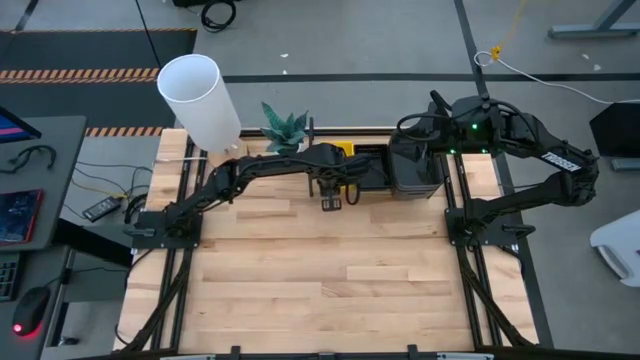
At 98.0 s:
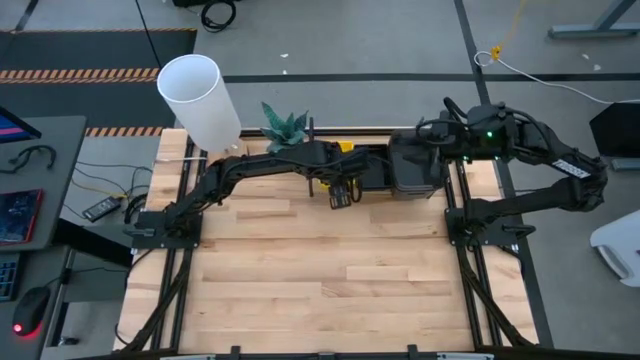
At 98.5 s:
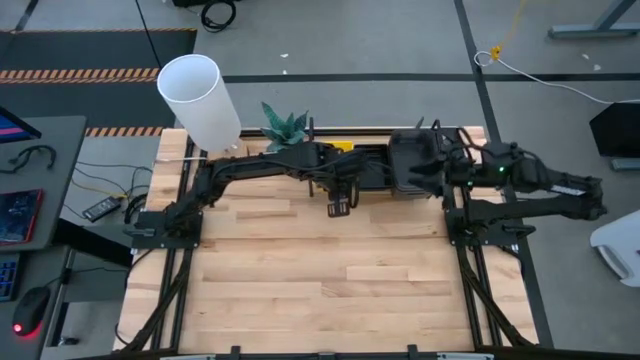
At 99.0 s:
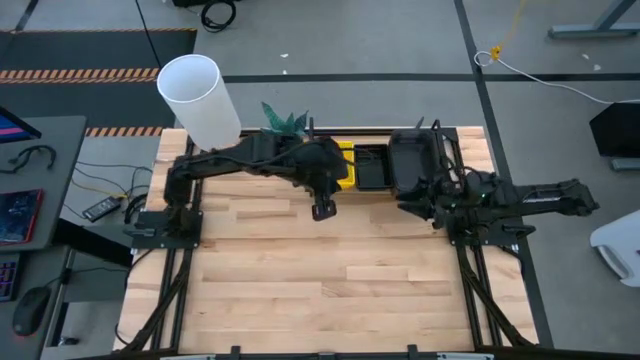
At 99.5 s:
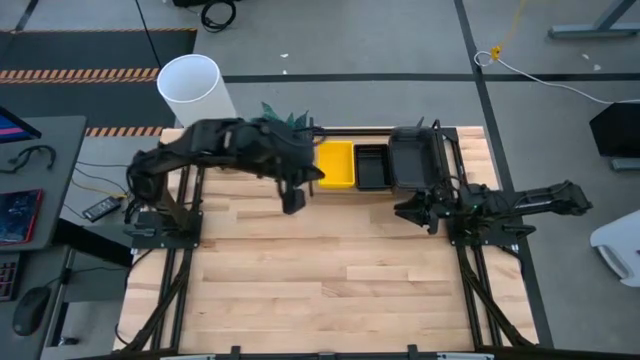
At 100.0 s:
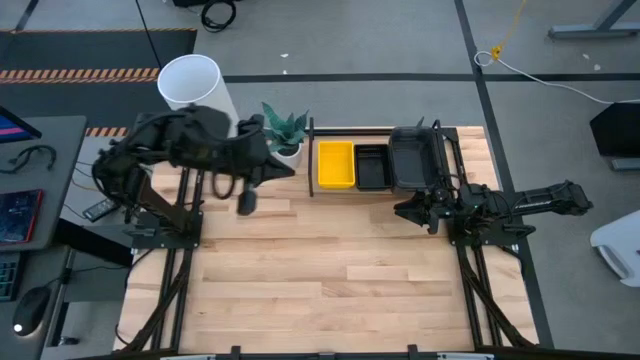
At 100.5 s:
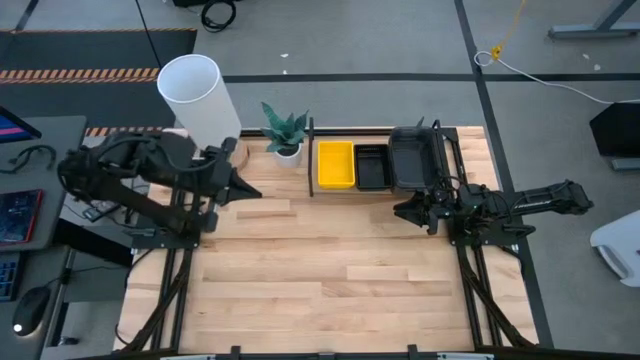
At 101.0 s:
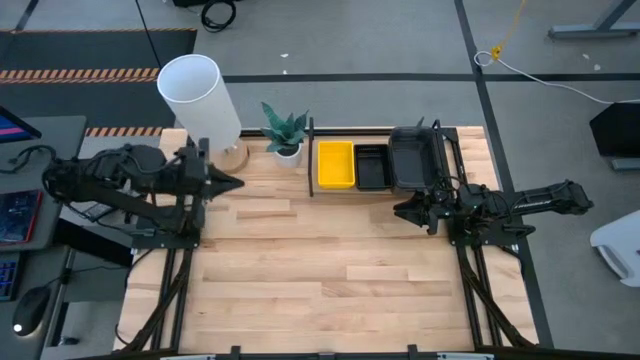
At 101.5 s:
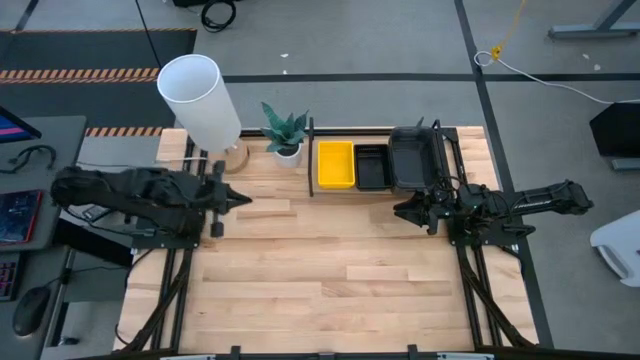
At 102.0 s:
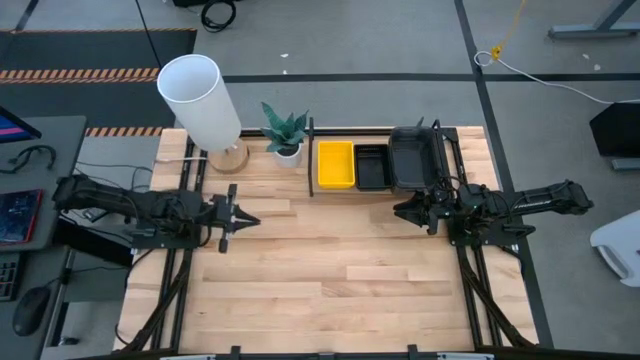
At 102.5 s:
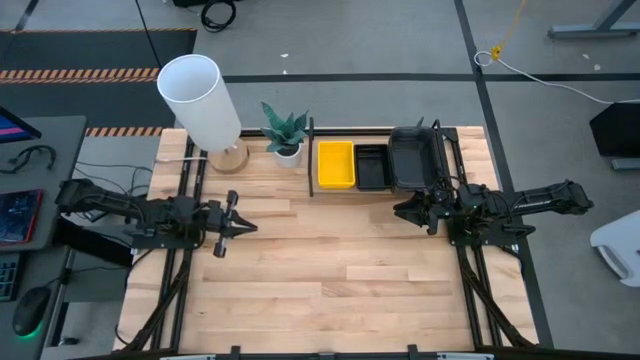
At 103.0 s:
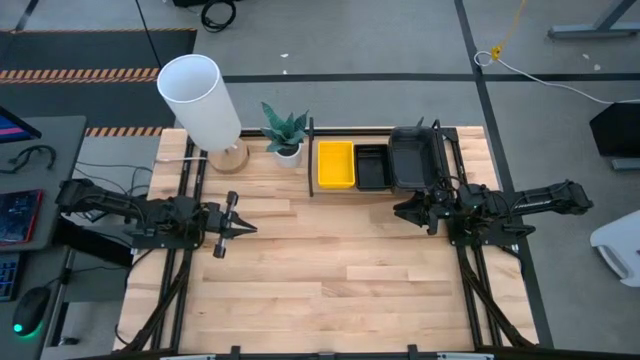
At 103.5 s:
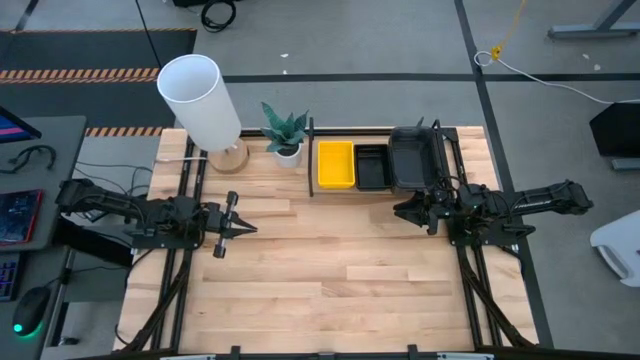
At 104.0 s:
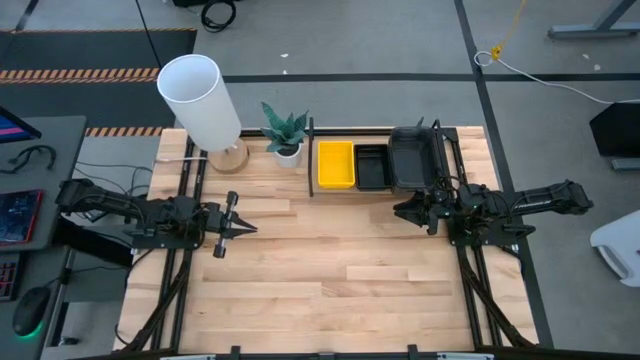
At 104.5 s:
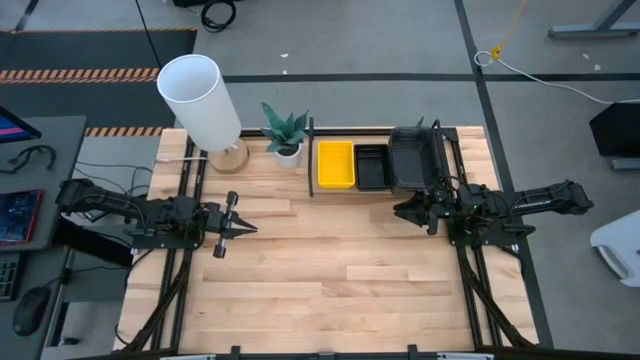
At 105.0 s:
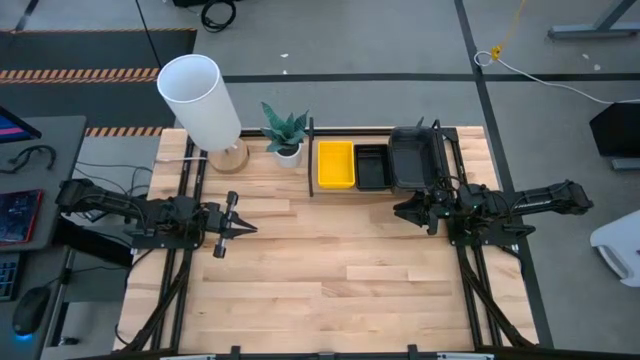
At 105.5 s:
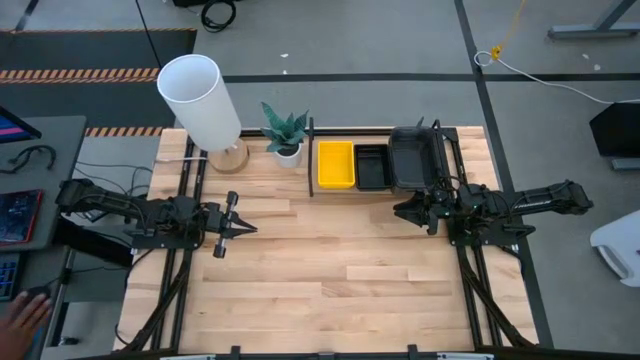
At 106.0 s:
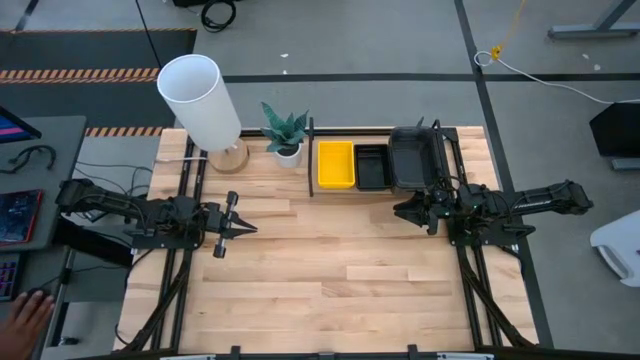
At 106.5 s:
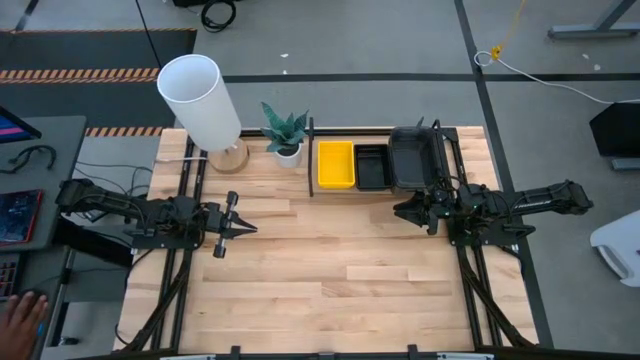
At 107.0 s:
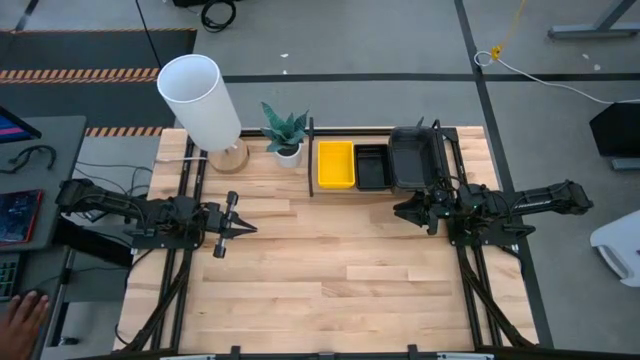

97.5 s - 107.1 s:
Task: Stack baskets on shelf by color
Return to Home Position

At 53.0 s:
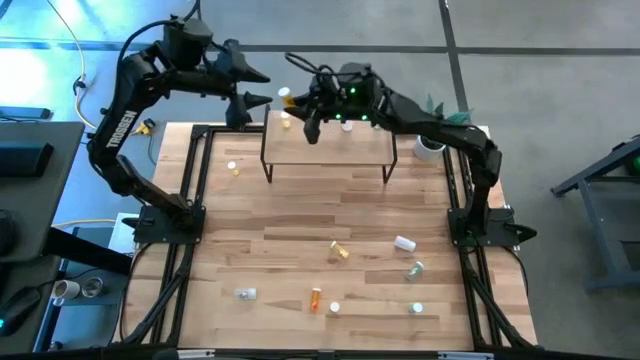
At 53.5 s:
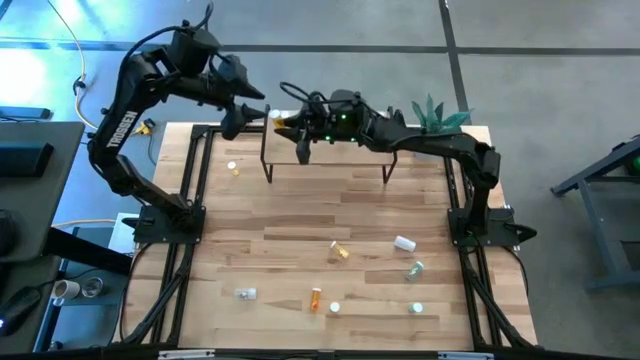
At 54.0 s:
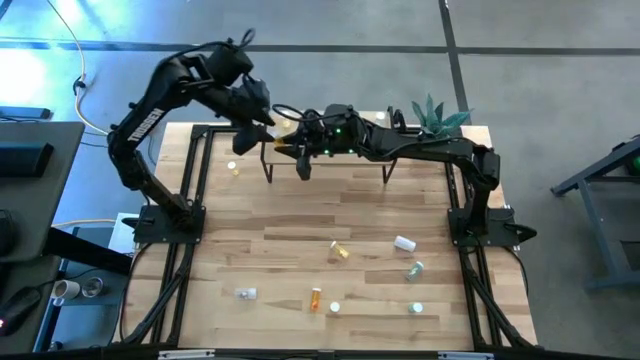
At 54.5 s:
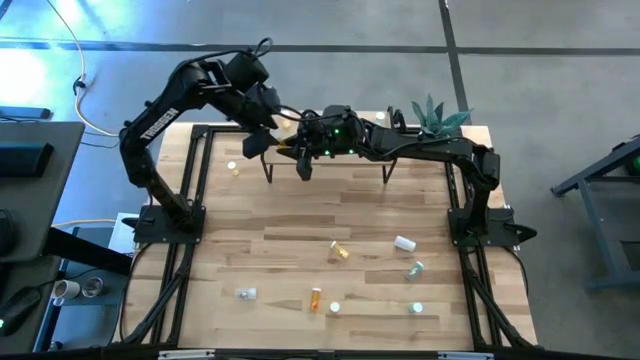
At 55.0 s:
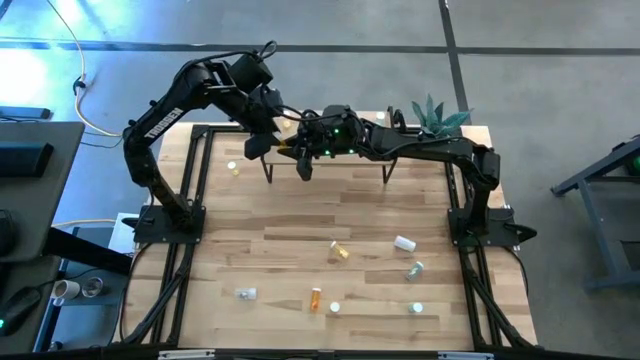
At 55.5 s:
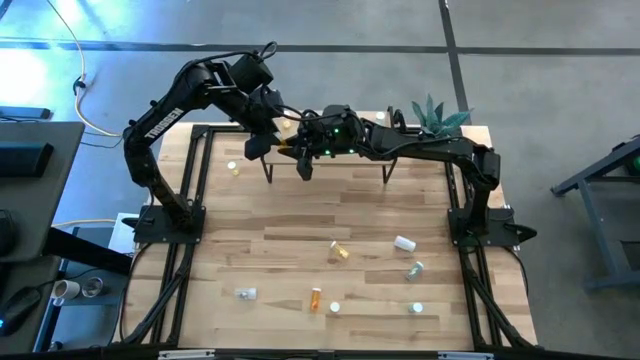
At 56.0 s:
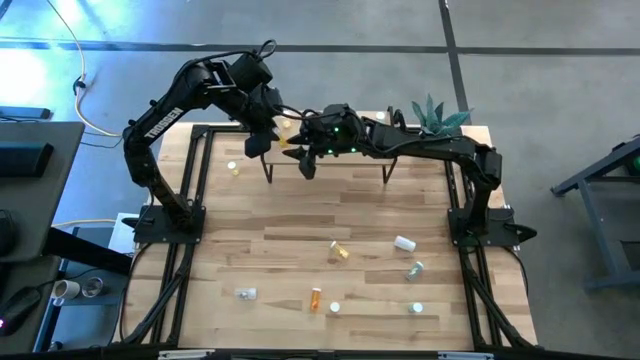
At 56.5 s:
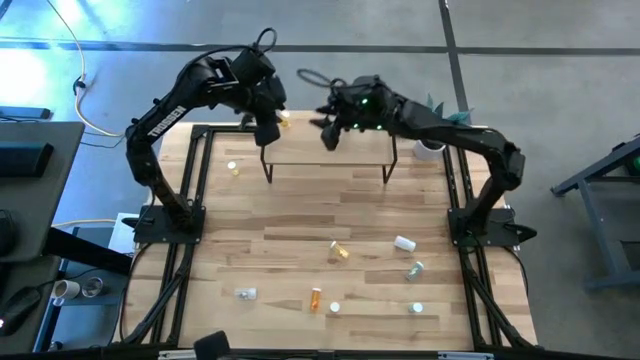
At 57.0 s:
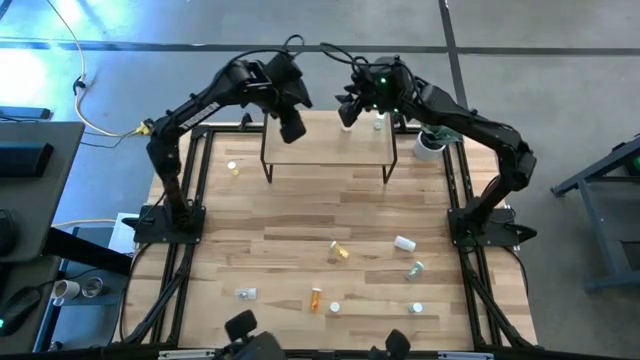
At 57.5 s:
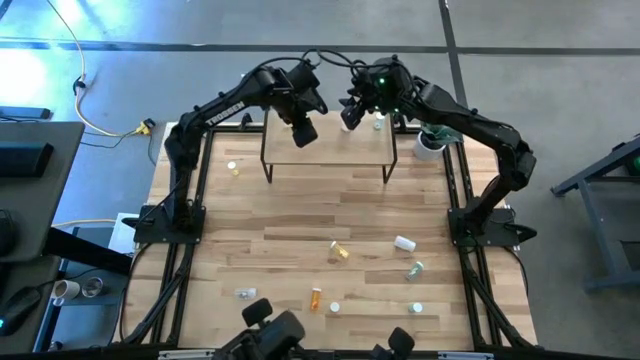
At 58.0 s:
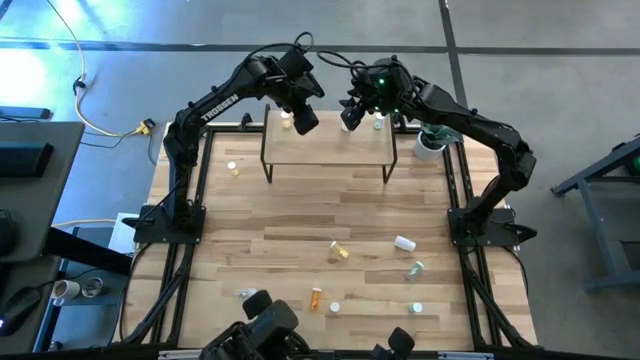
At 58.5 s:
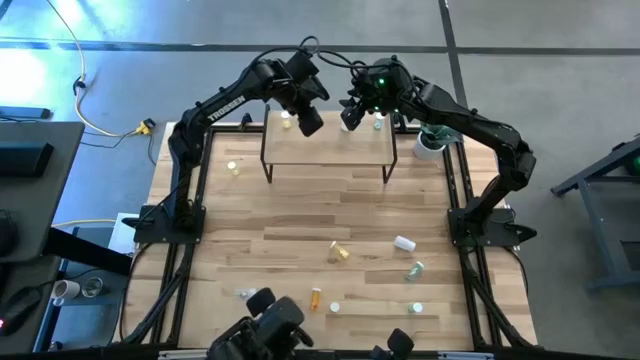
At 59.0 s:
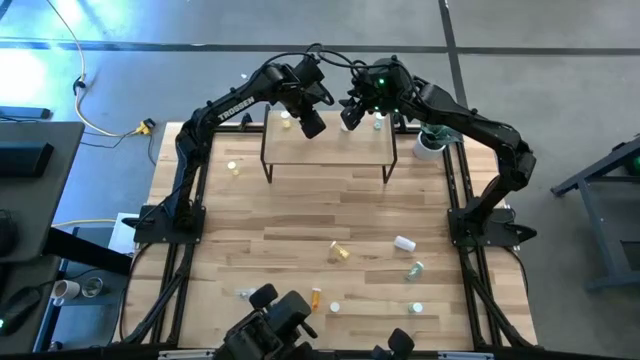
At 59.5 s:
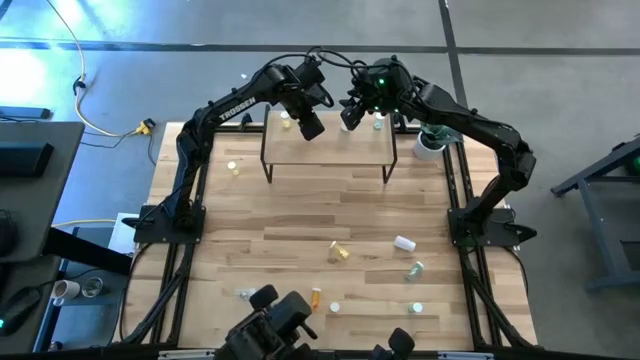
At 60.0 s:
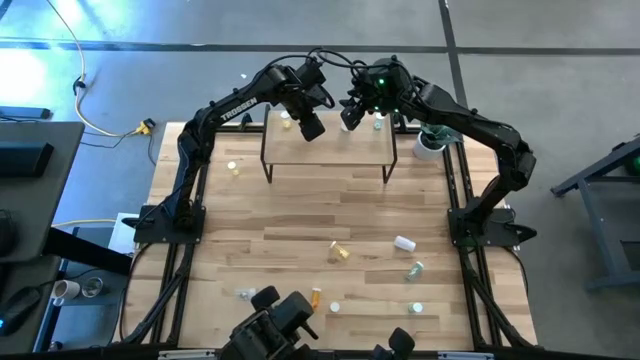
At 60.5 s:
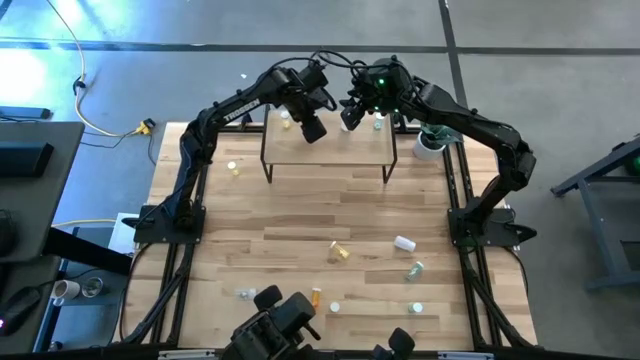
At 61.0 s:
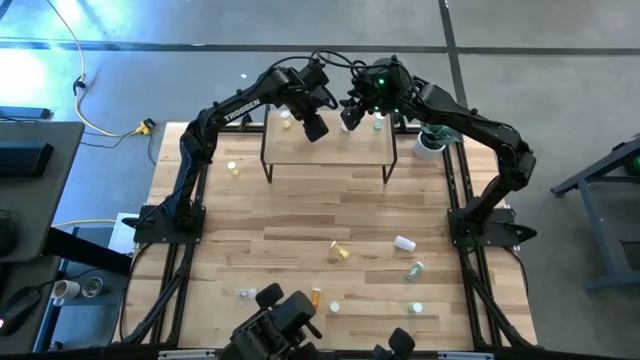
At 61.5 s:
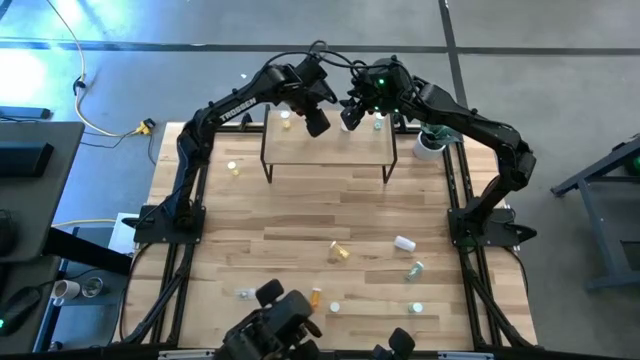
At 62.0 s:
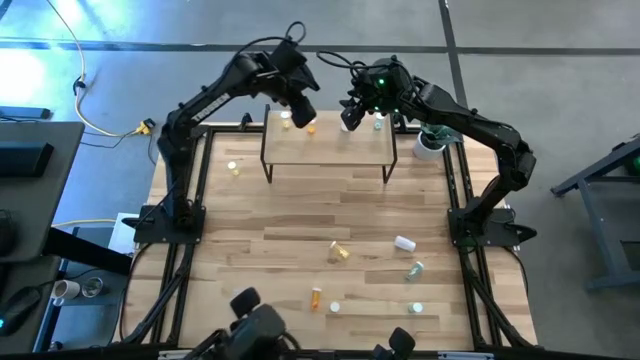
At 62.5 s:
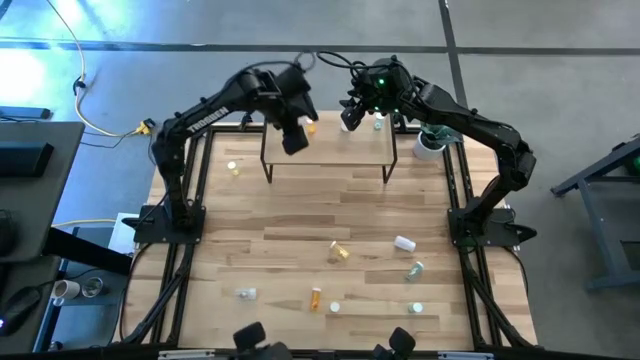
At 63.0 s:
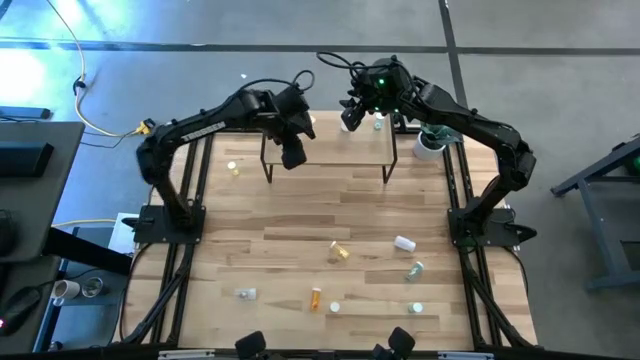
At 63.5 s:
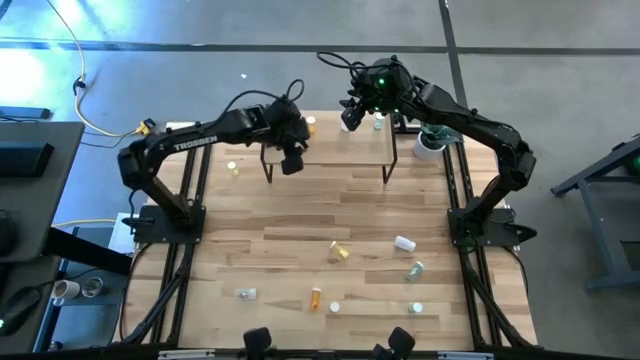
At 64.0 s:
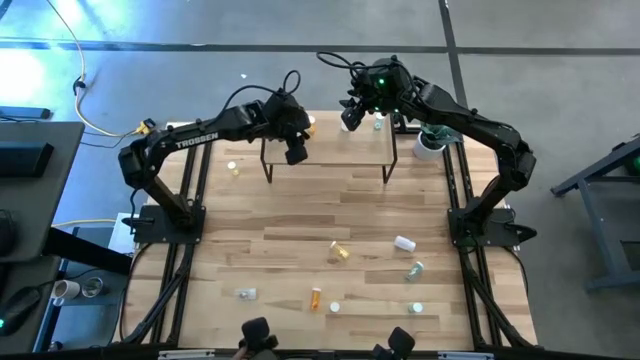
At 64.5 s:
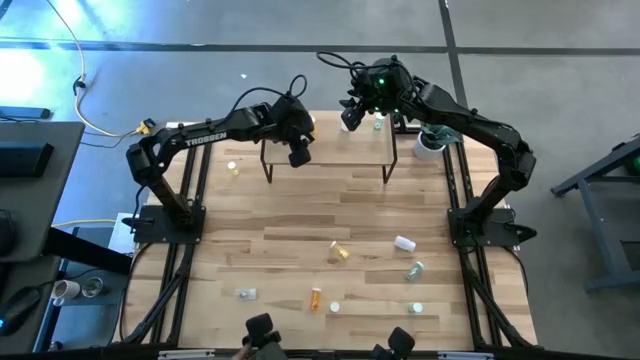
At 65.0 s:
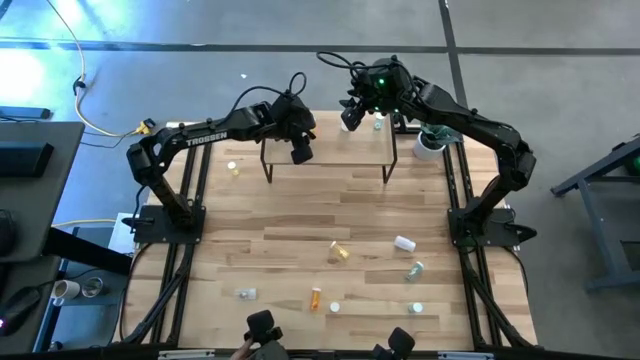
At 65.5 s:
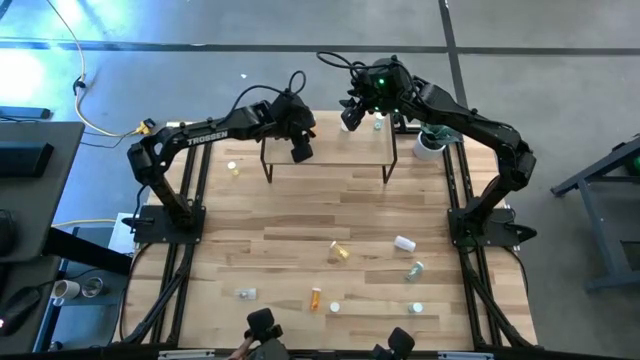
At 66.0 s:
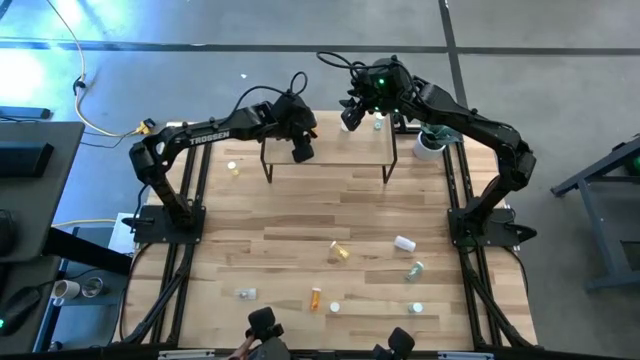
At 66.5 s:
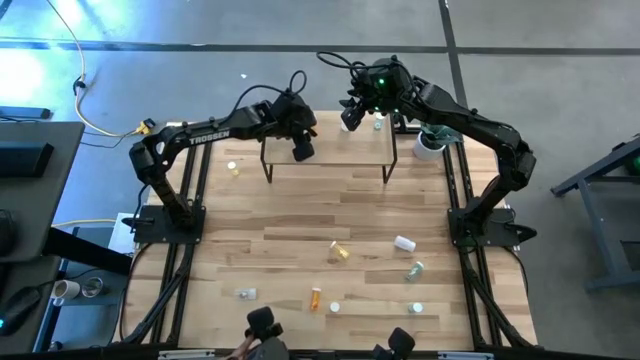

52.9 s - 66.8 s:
Task: Pick and place medicine bottles onto shelf by color
Put the top left orange pill bottle on the shelf
